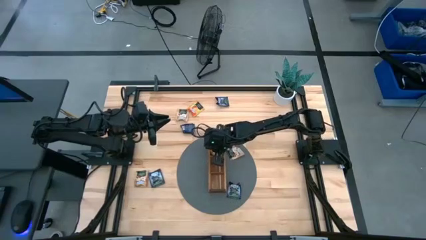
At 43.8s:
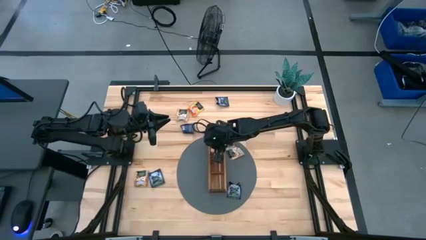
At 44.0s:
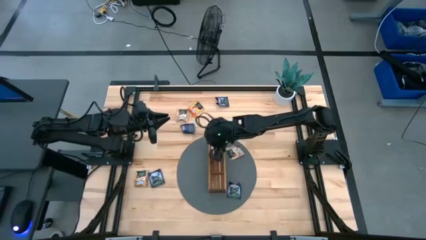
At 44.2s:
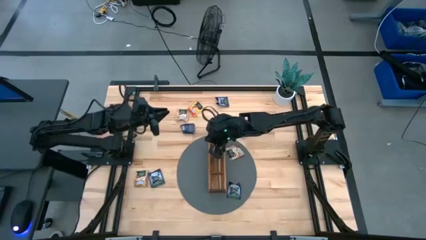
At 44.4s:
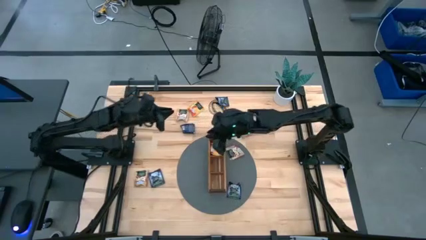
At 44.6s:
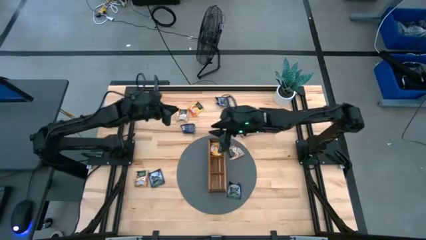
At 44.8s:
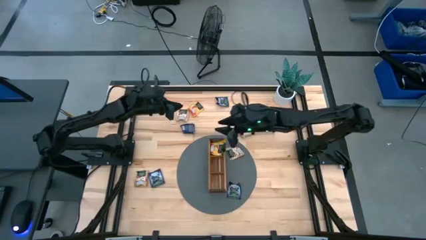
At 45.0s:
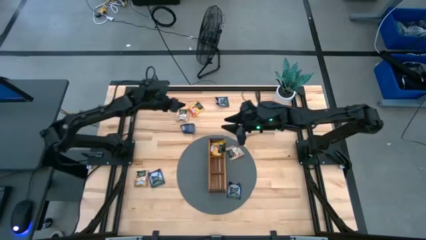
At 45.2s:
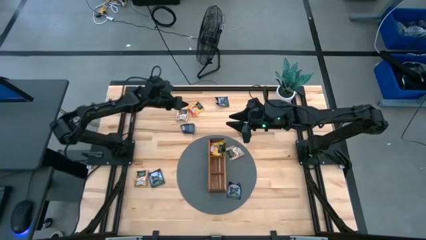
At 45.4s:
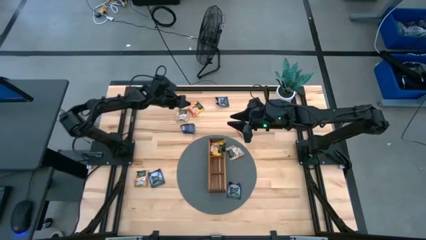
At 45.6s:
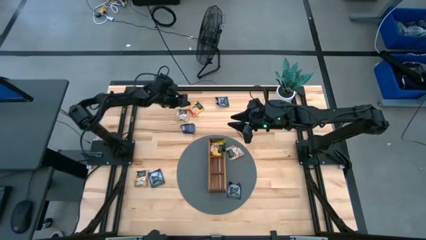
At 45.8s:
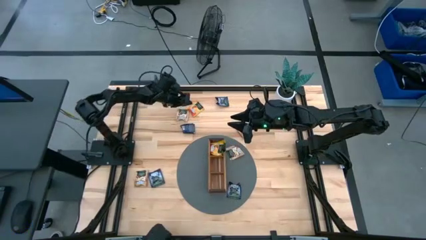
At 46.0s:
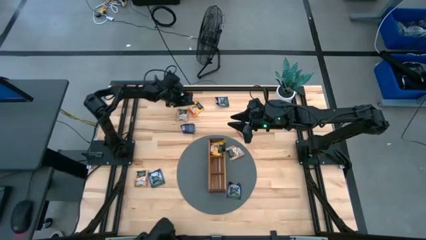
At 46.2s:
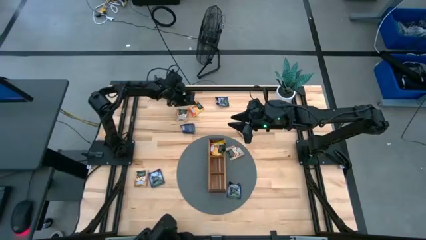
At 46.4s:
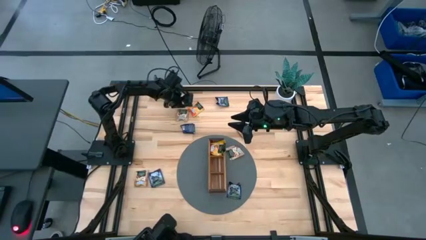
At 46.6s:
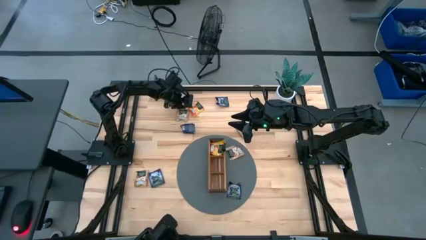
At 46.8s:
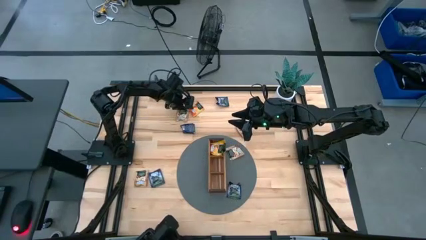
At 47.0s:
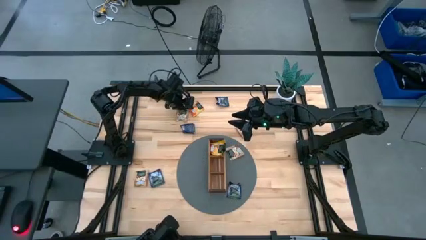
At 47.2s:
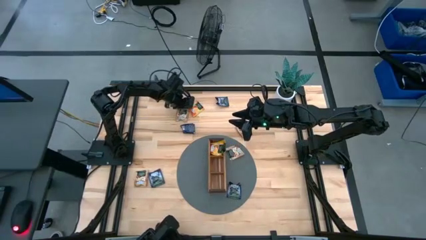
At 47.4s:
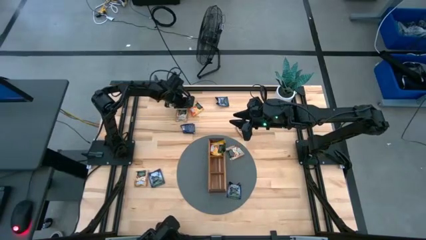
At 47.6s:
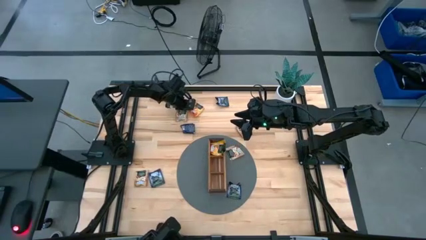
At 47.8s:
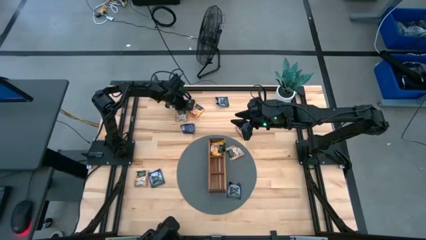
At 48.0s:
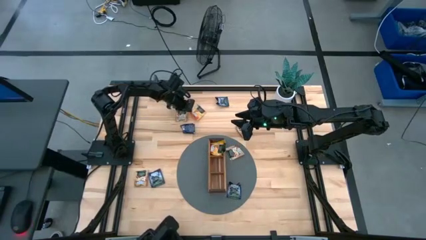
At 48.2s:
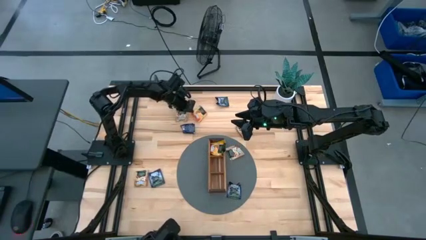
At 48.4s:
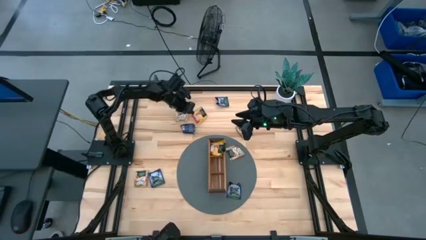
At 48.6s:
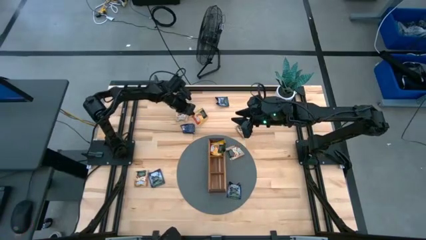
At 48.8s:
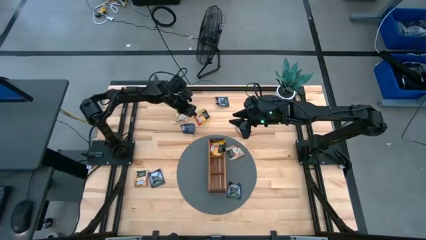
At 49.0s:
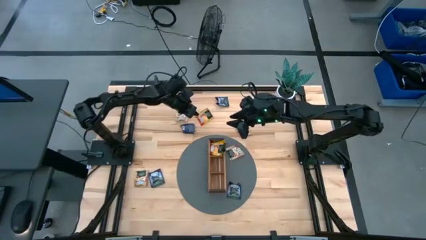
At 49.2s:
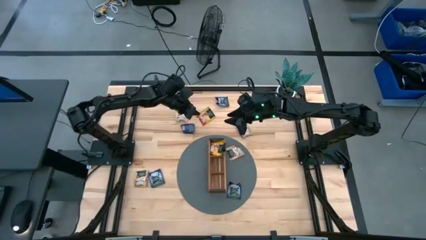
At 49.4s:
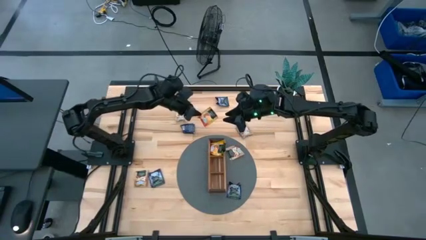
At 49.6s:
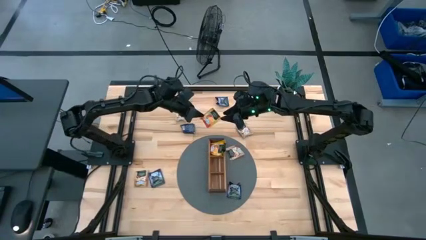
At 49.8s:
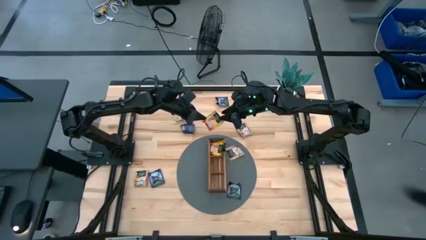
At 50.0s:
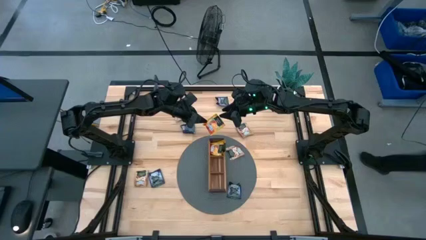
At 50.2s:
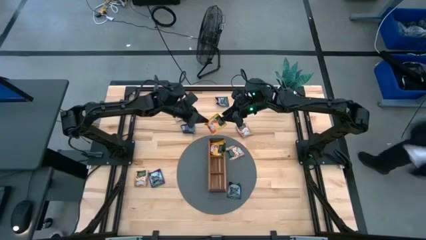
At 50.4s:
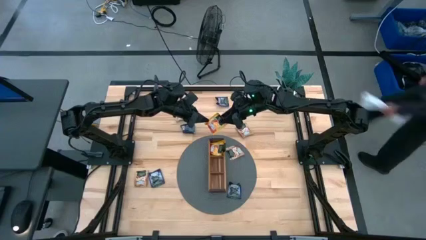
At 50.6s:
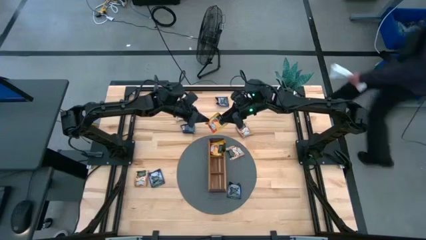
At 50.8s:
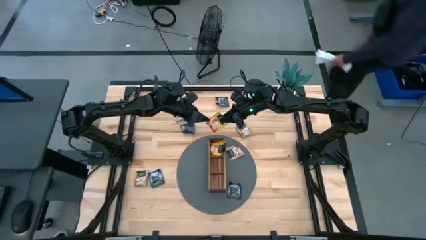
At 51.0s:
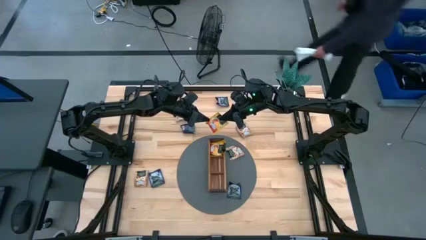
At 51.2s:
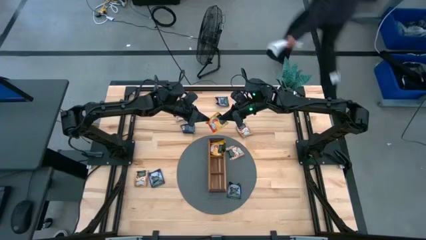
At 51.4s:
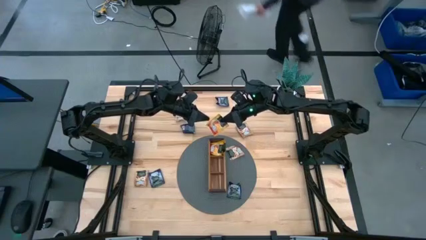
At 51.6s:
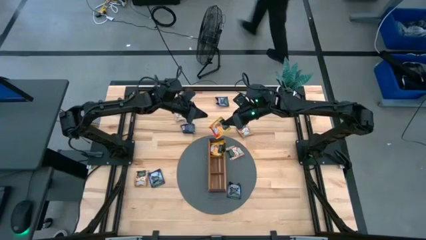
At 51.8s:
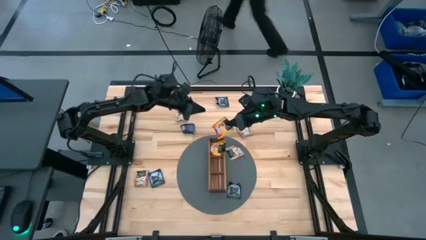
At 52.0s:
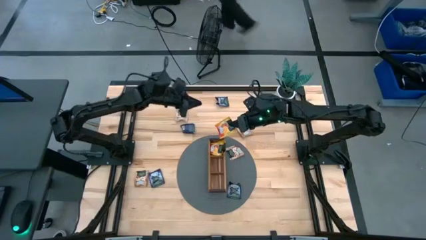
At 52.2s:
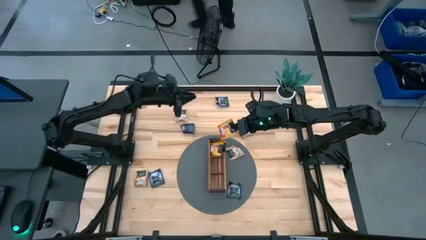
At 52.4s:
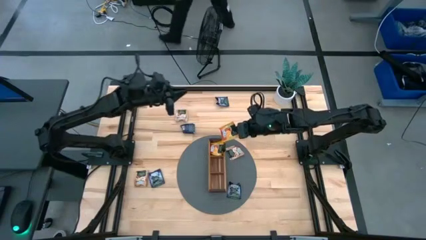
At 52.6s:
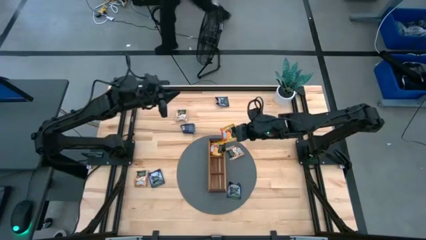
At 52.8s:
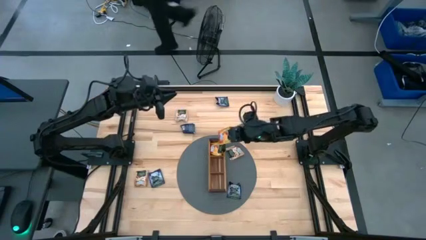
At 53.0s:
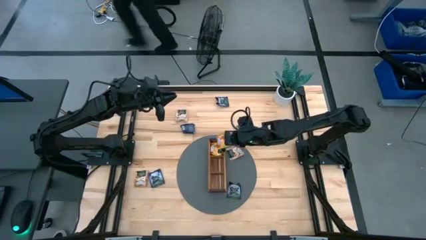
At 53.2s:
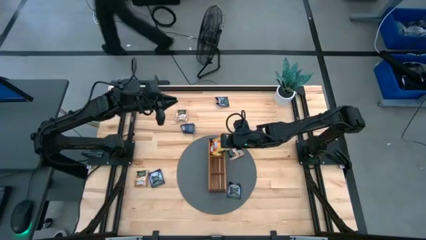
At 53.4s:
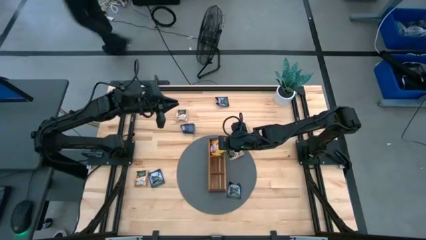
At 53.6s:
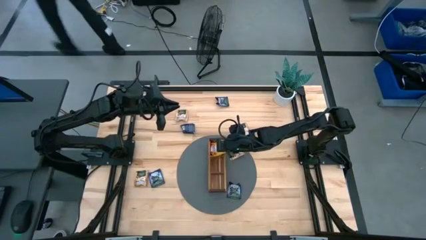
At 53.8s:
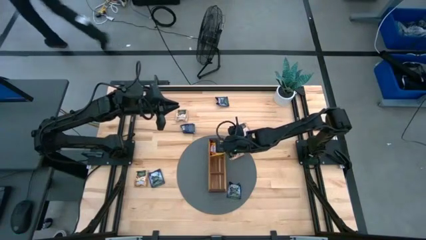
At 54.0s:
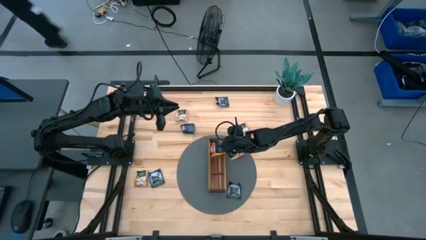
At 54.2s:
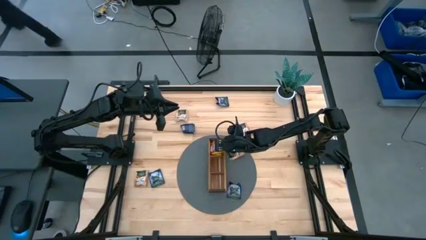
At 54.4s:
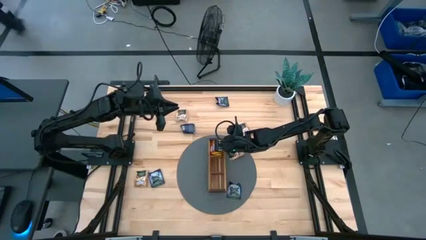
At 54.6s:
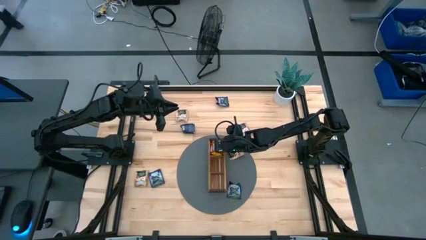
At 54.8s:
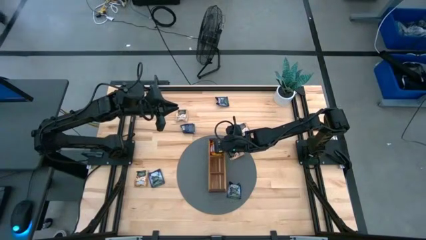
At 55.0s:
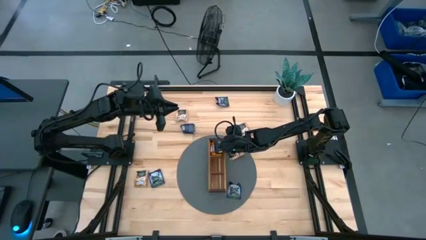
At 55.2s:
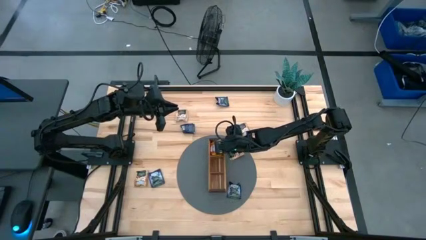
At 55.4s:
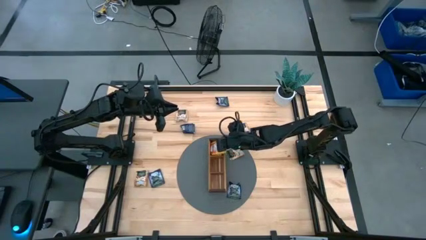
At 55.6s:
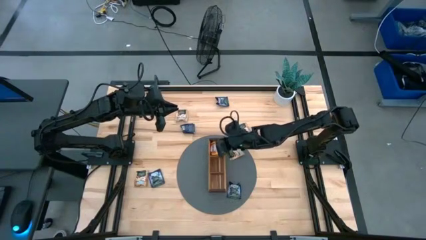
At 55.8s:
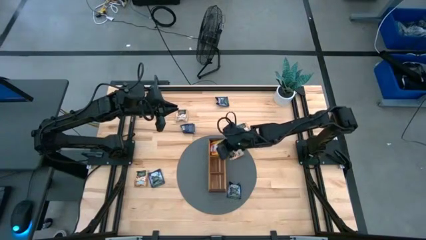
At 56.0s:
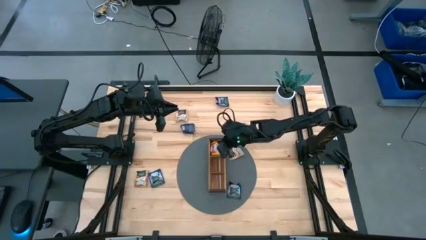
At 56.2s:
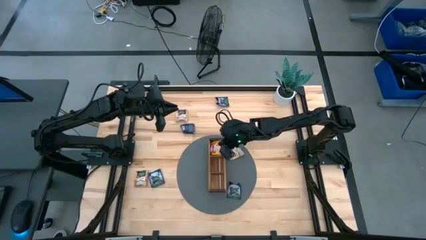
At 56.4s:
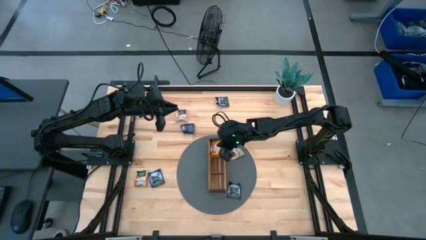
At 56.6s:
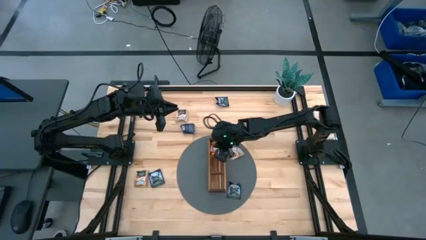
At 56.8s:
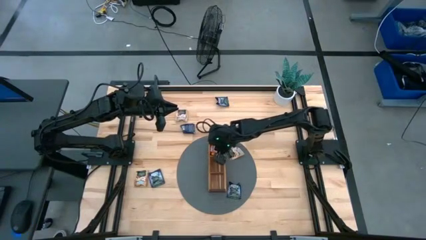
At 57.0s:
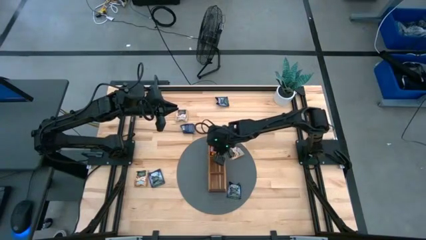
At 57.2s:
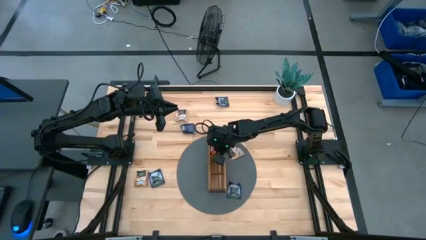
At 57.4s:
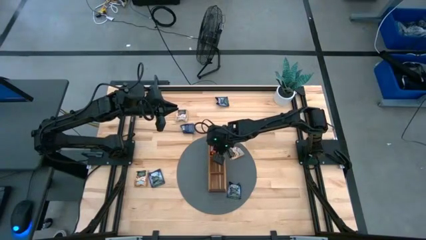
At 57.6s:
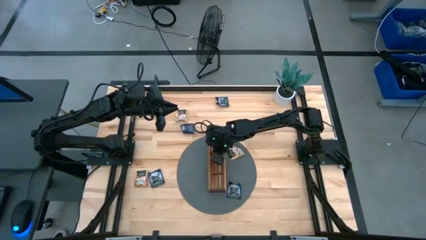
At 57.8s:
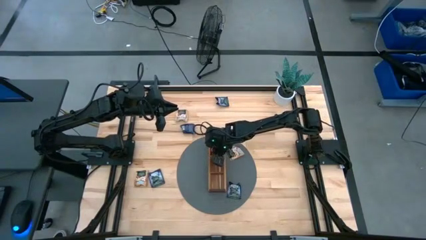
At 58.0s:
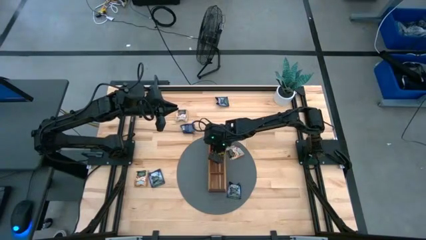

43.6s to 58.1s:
Task: Pick & Place Tea
Put the orange tea bag into the top section of the wooden organizer

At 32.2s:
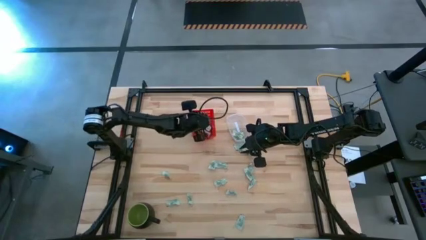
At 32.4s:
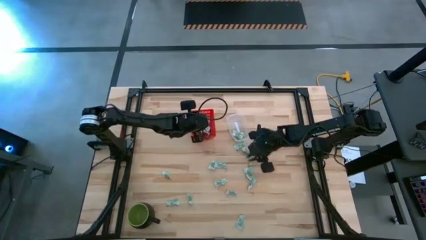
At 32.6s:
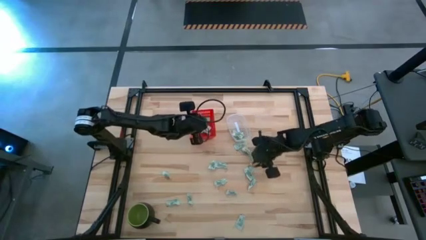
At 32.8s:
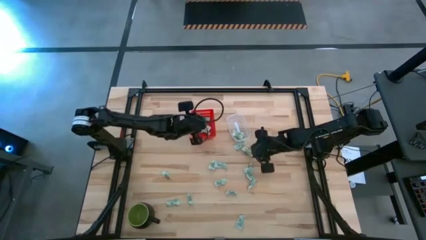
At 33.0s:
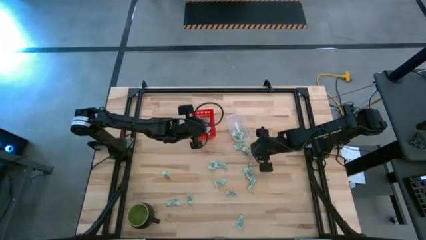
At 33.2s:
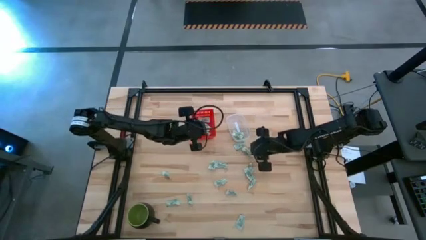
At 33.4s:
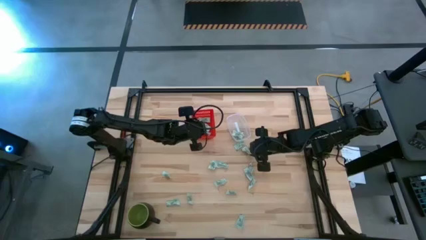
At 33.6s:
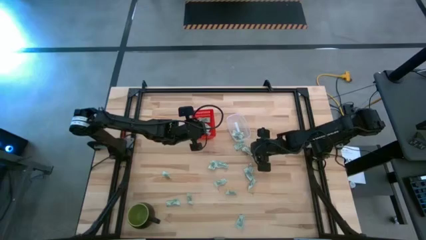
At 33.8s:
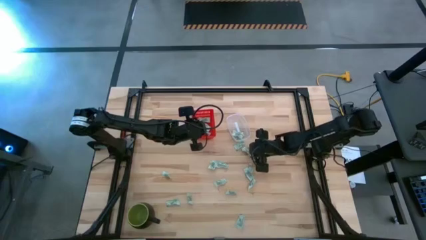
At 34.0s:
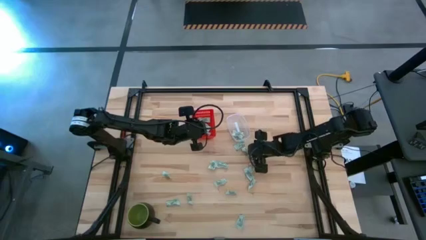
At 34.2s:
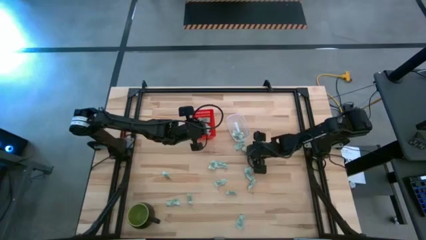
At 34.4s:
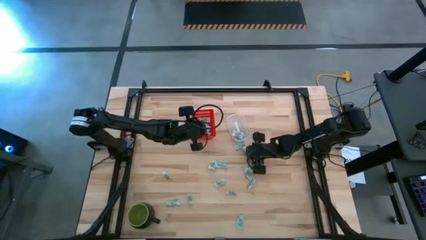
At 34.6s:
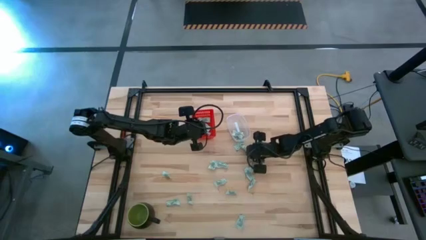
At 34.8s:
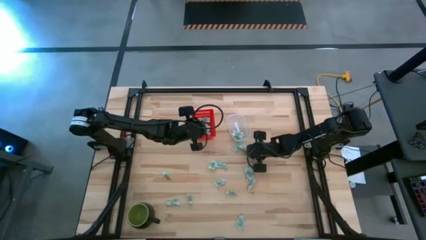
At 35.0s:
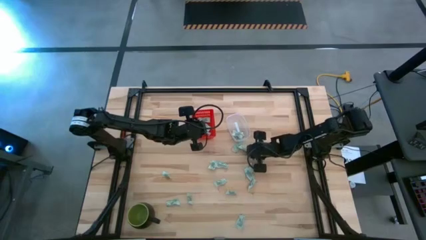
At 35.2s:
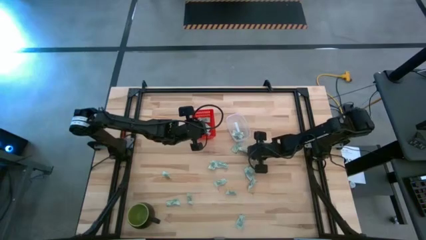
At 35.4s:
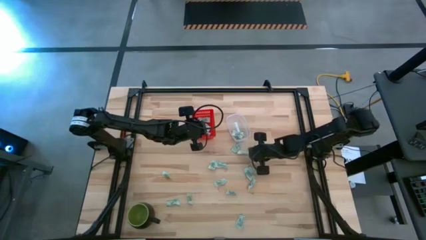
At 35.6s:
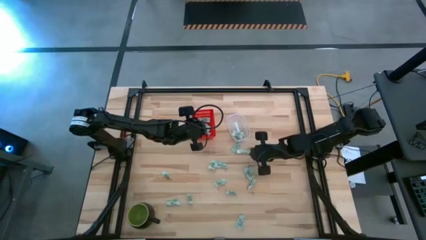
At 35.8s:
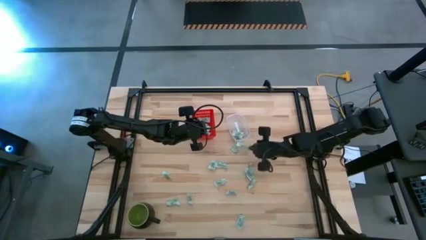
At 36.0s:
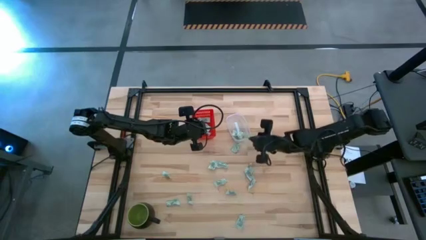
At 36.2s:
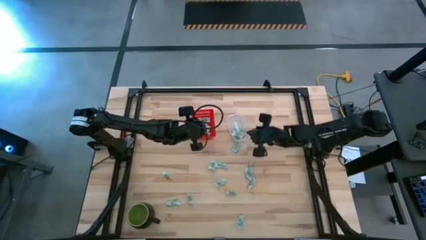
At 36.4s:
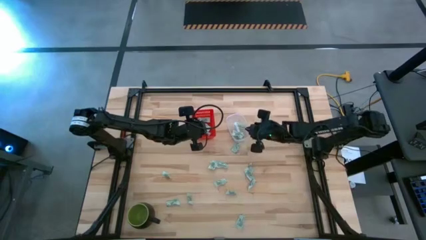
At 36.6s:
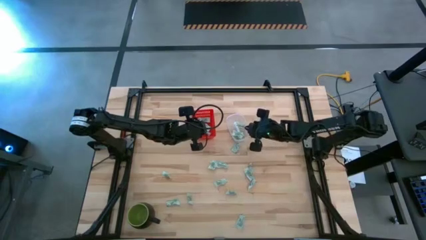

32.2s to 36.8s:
Task: Pick and place items into bin
Put the white stevia packet into the transparent bin
